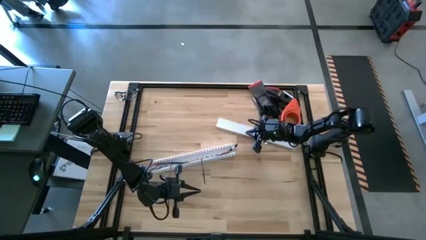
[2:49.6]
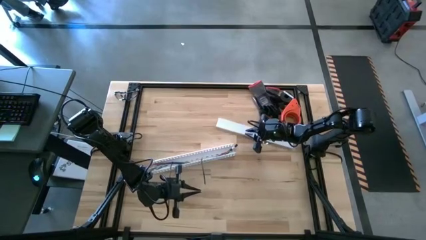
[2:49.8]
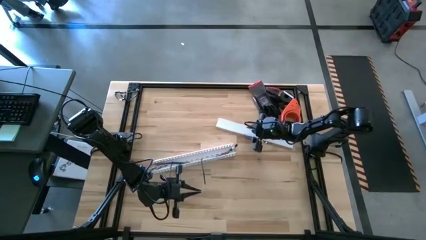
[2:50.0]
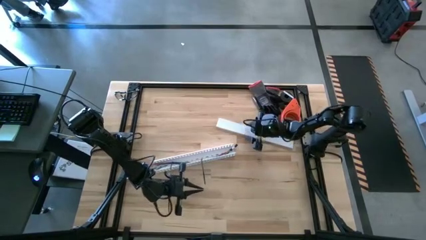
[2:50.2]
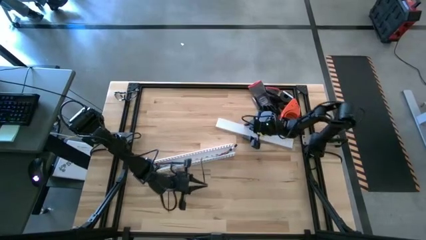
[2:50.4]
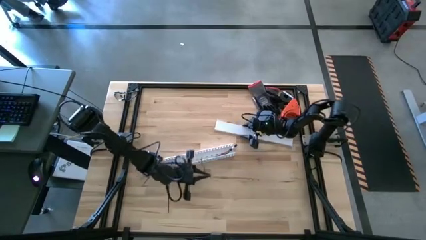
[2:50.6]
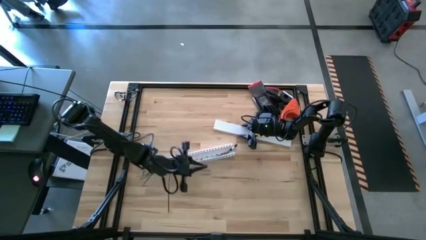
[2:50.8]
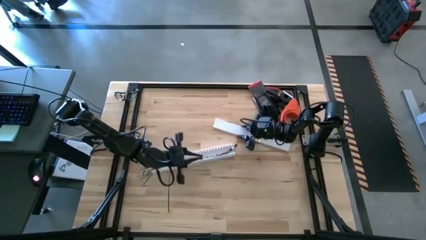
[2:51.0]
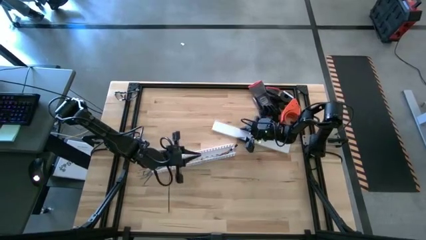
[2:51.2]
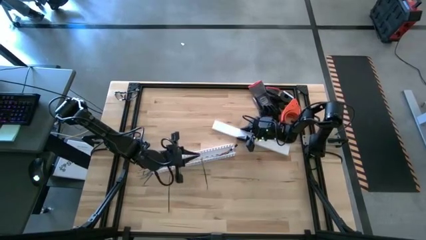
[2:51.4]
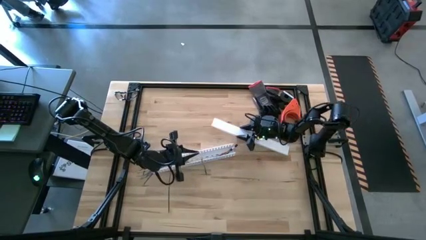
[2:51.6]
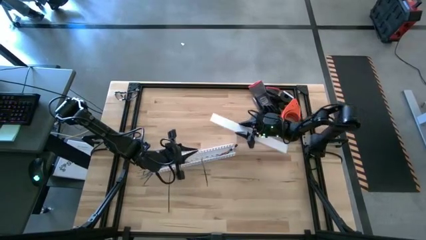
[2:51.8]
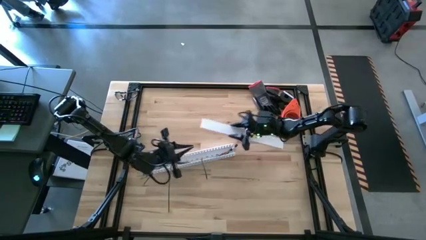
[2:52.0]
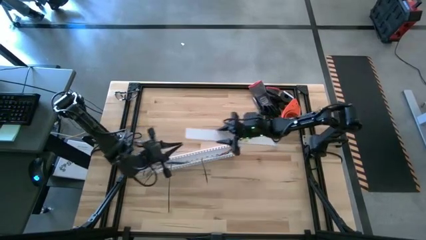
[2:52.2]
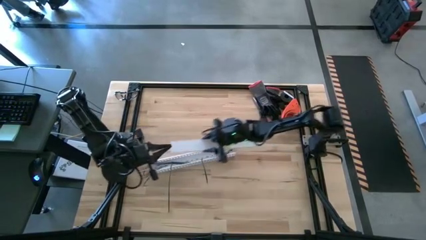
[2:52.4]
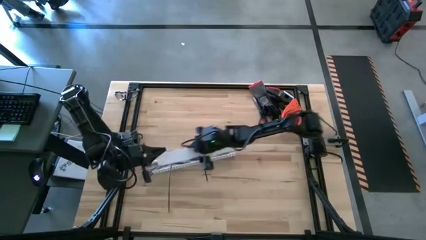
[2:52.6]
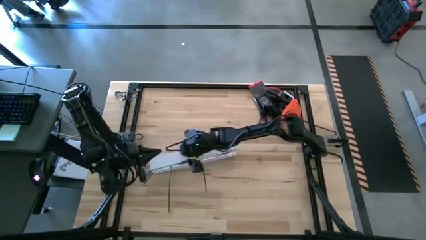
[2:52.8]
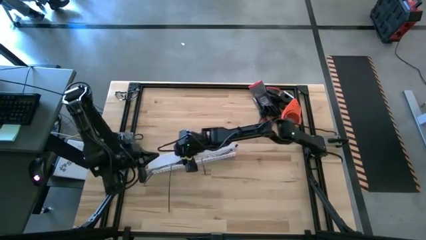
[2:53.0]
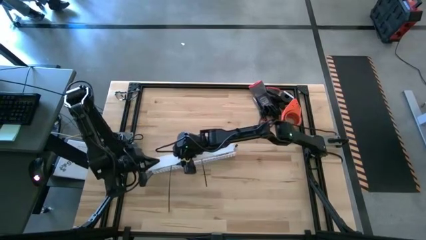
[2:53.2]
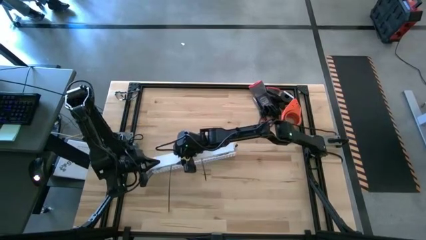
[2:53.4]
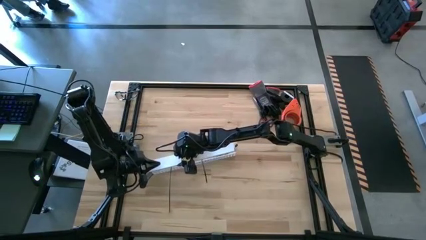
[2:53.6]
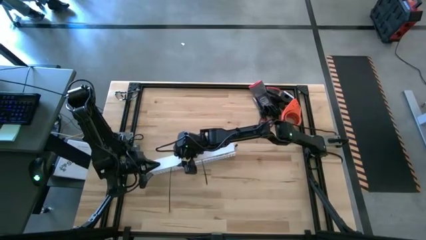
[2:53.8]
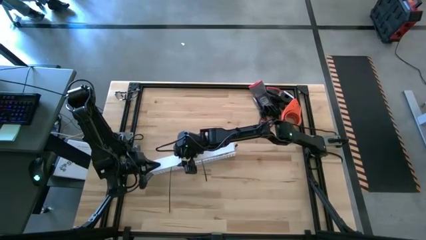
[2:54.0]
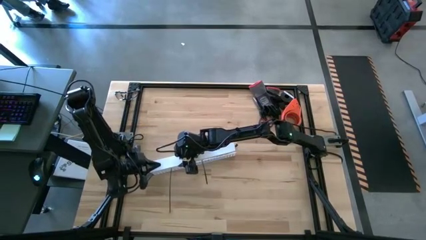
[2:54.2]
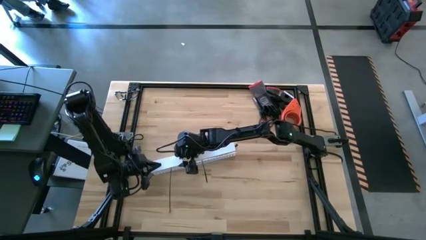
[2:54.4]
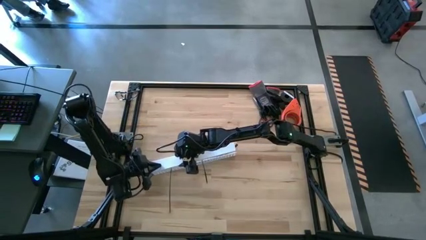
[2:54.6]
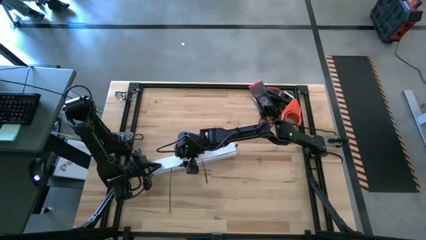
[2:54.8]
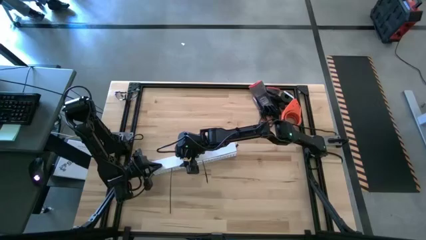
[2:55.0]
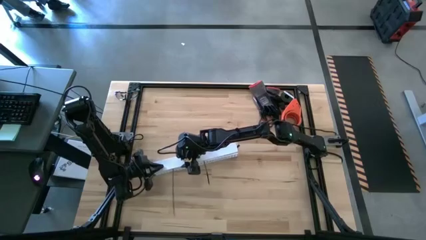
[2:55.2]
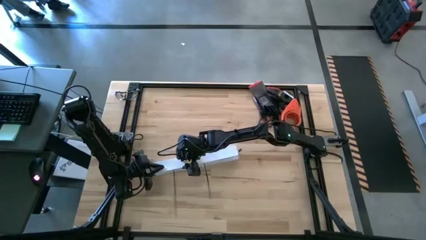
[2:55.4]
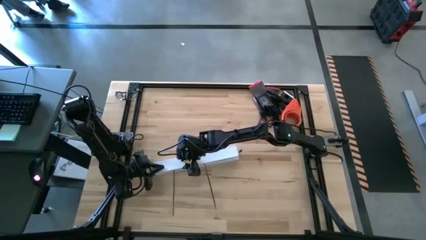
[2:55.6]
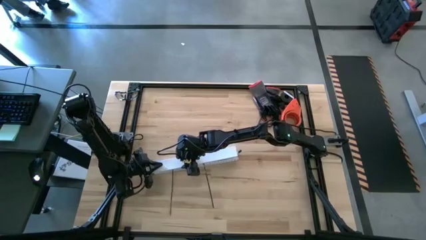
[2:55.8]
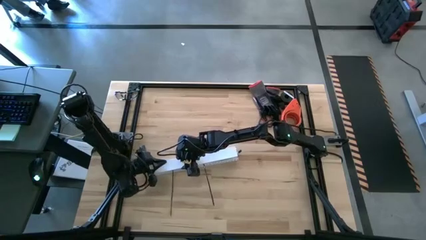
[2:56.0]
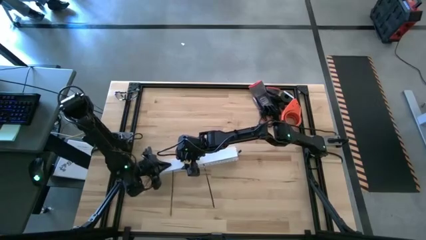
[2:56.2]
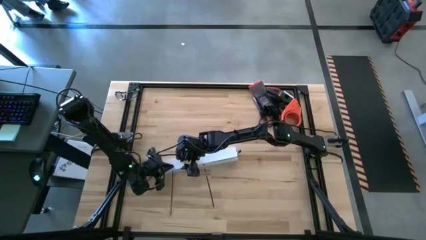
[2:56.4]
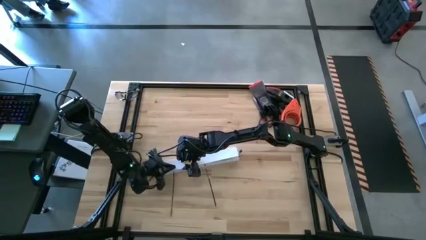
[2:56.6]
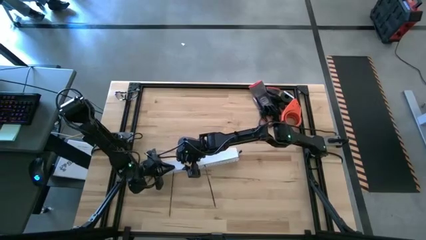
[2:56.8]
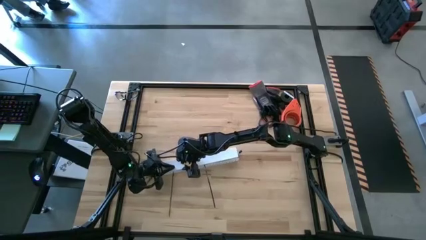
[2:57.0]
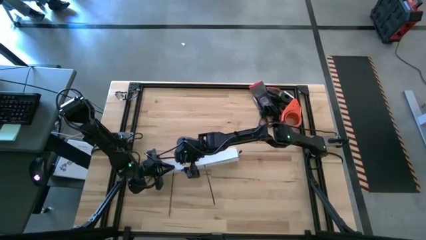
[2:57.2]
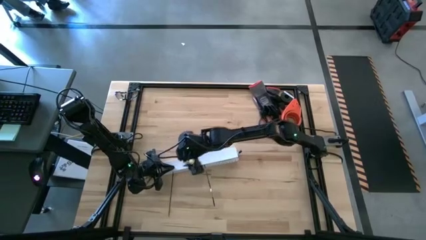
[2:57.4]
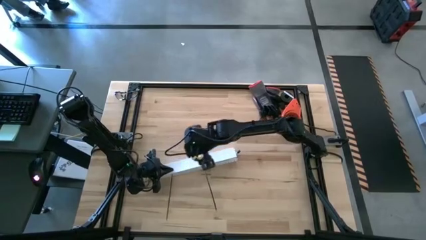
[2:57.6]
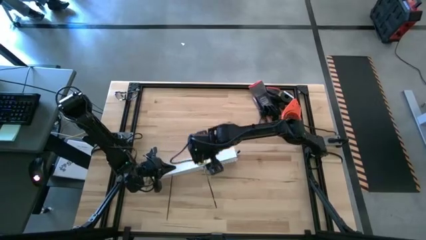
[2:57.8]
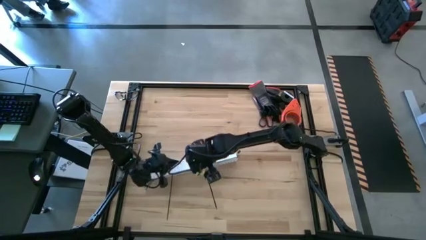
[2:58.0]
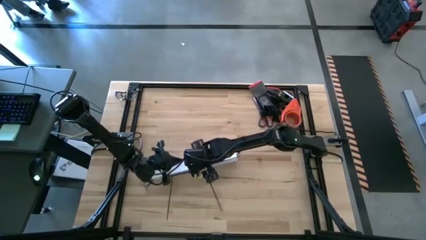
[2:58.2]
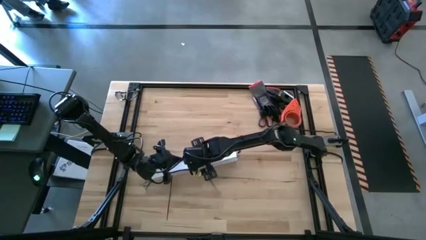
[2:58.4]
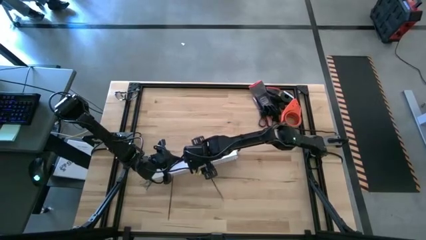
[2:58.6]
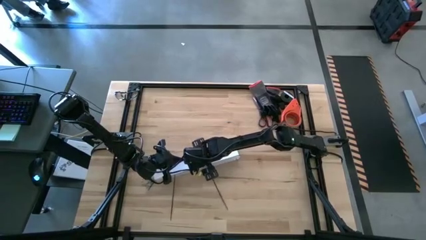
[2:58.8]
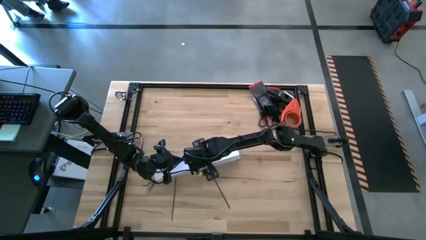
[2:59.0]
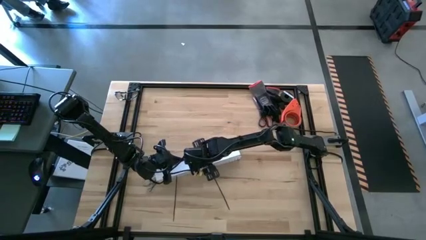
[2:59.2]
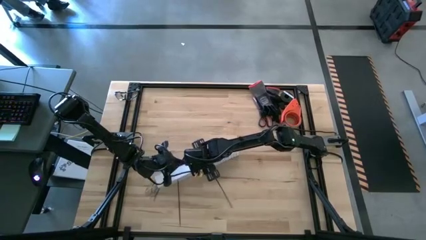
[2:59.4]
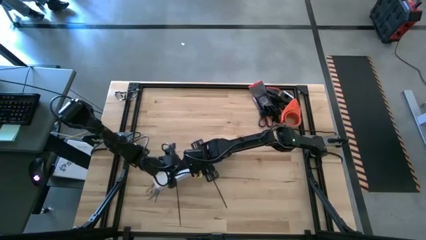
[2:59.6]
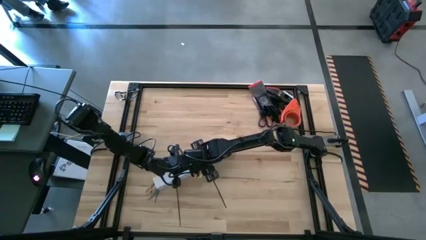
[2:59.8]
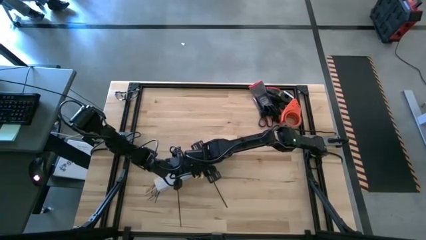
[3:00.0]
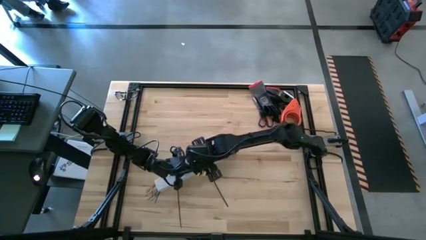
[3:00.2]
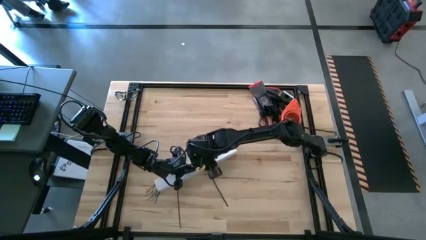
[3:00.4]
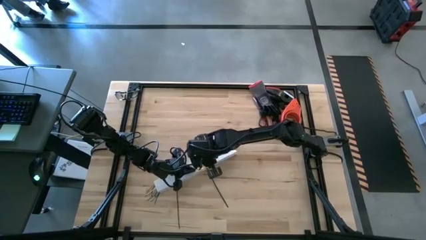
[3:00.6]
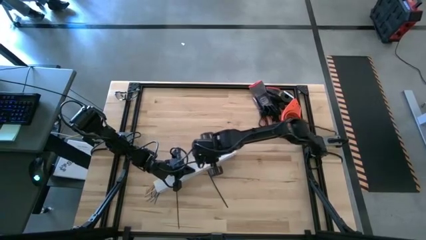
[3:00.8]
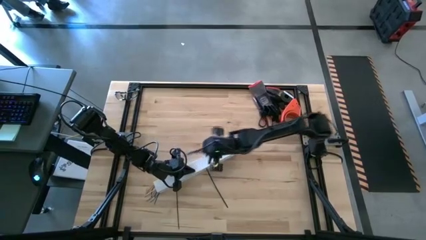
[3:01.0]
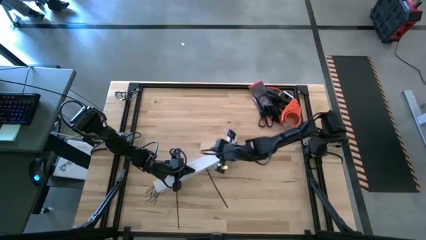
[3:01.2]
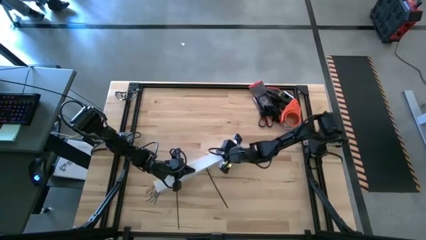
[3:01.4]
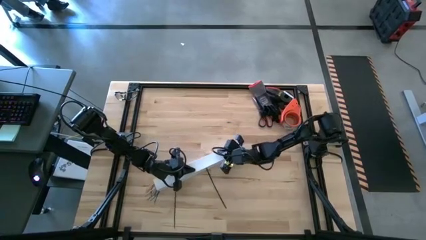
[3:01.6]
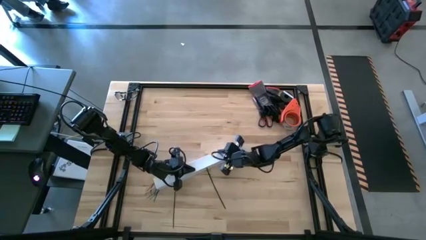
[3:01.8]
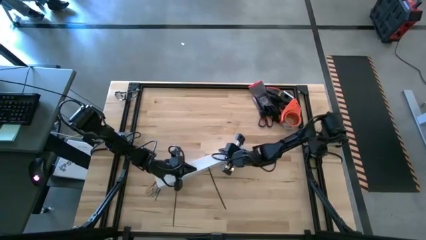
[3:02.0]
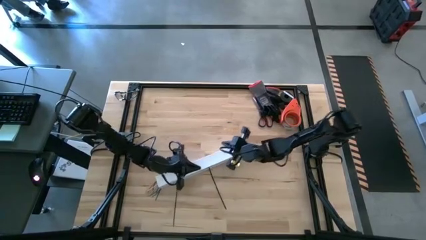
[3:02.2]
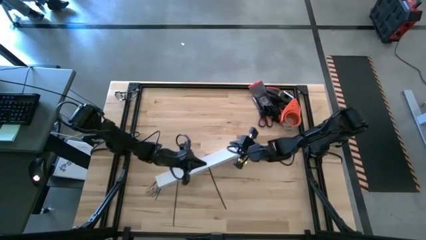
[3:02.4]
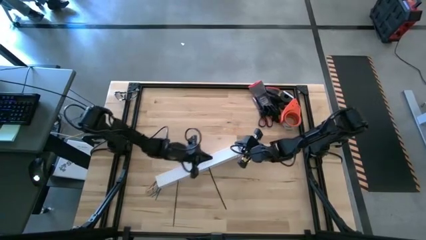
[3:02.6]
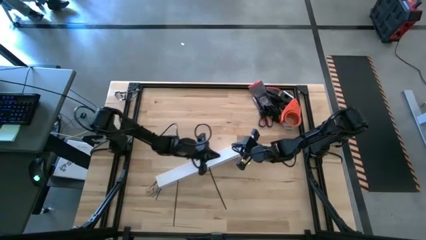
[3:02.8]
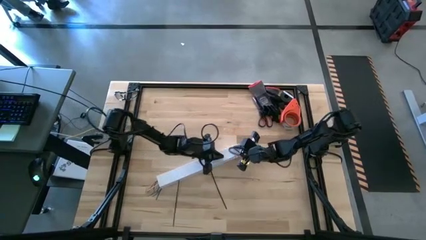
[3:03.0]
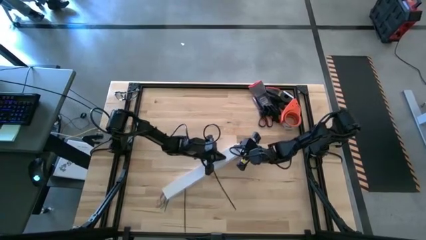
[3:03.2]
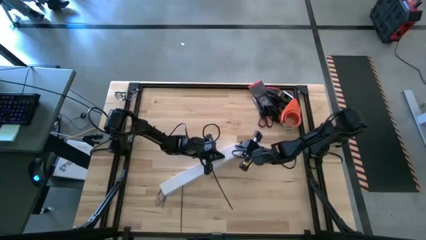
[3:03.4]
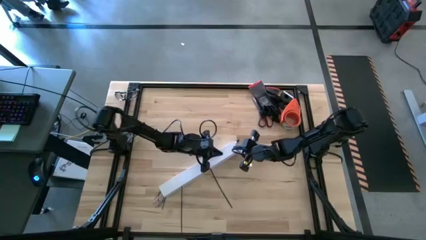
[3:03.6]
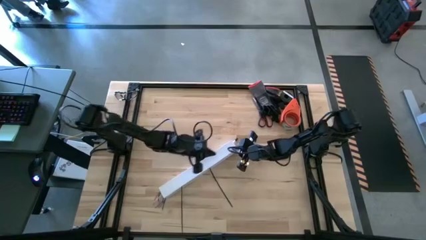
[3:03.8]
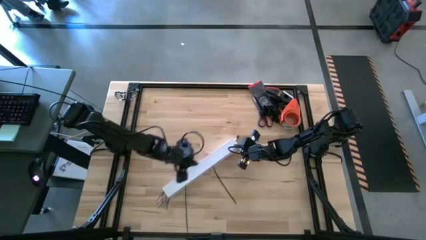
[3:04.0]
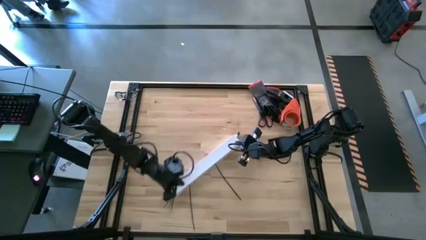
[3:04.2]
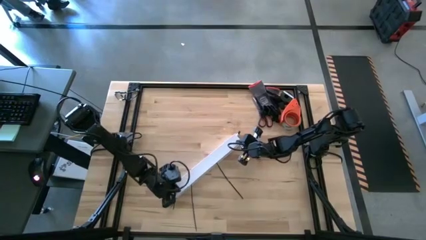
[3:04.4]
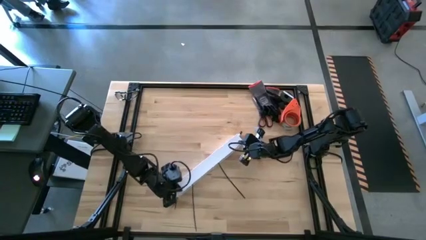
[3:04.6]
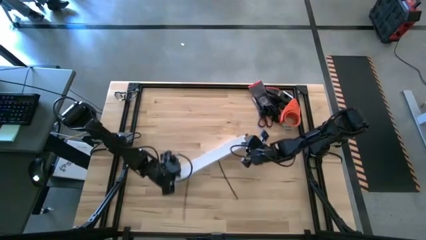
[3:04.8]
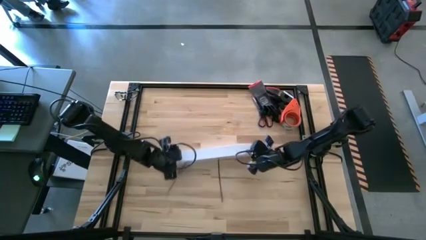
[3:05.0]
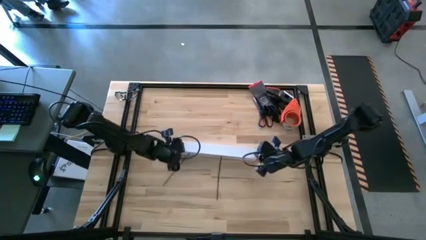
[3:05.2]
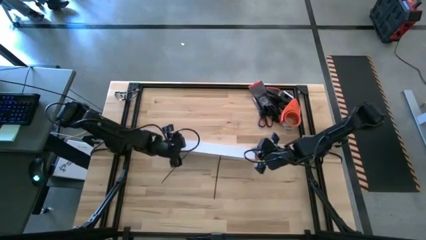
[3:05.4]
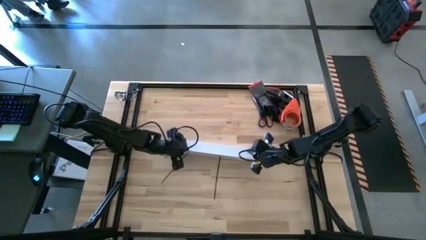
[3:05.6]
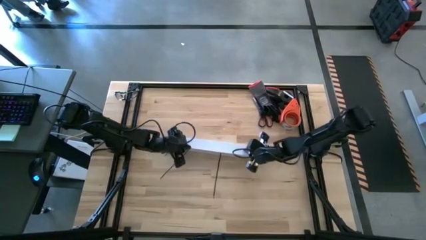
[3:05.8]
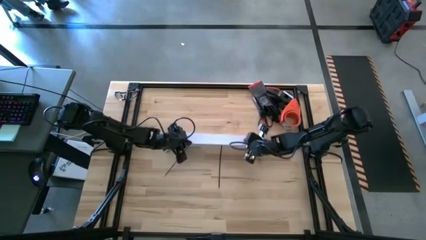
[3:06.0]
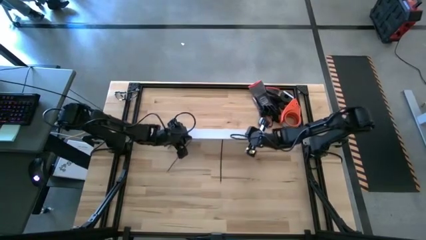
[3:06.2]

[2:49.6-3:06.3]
Task: Ziptie cables
Close the cable duct
